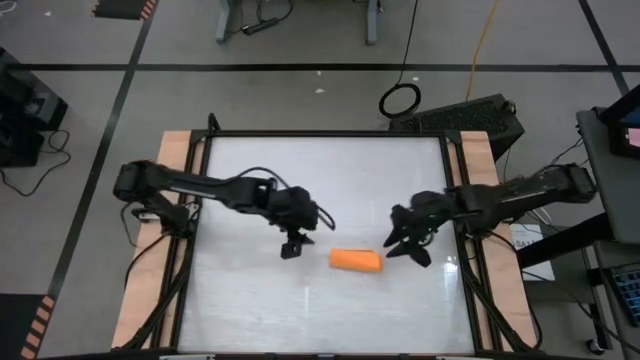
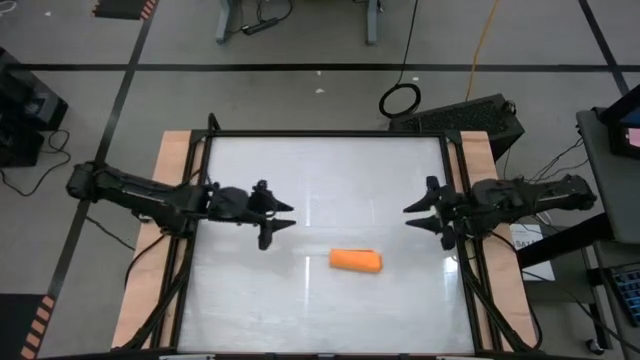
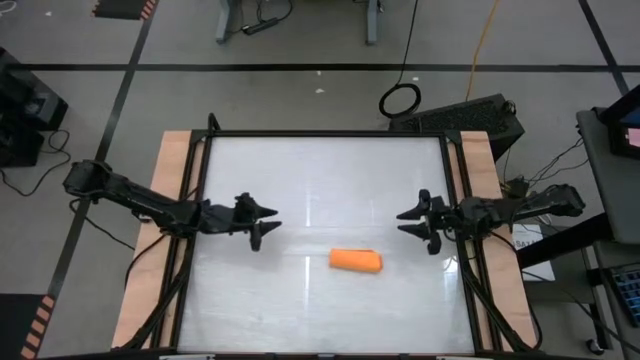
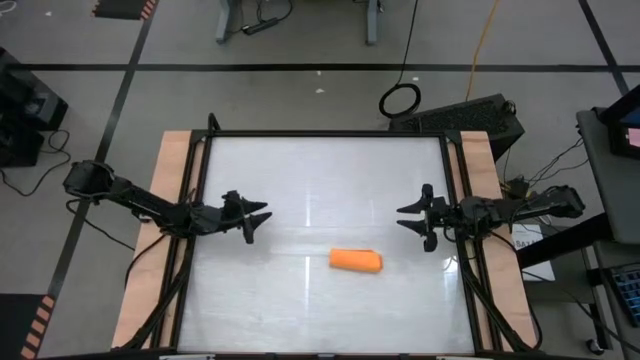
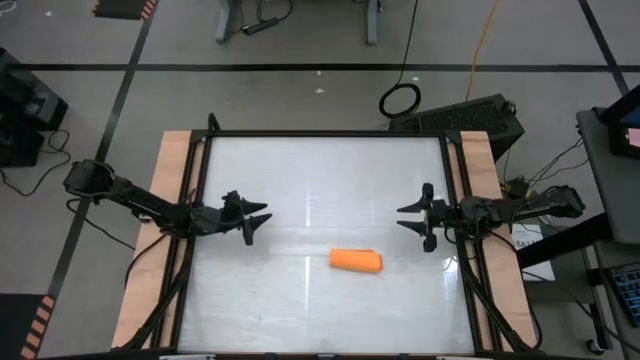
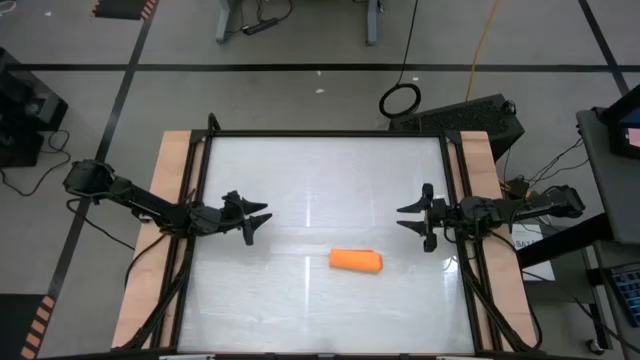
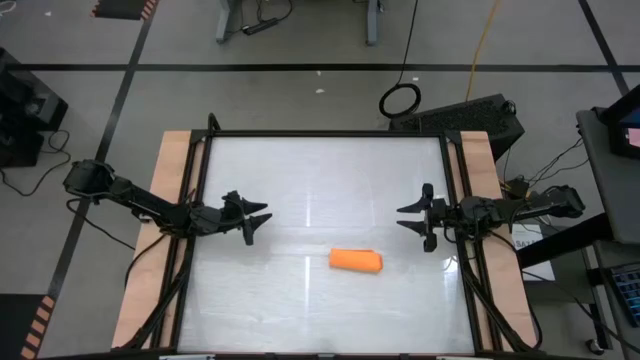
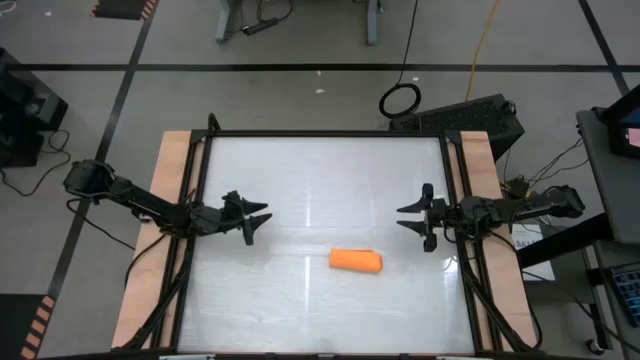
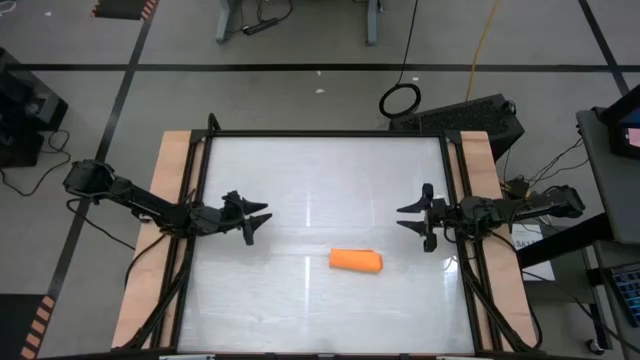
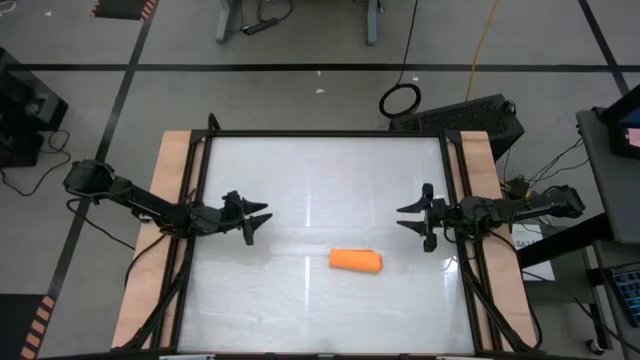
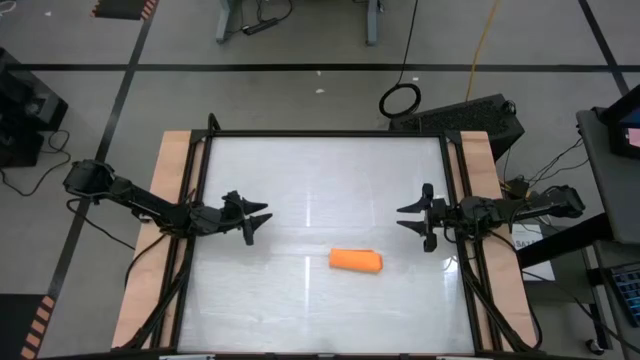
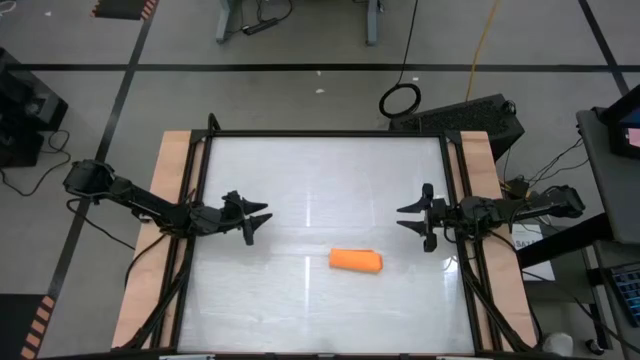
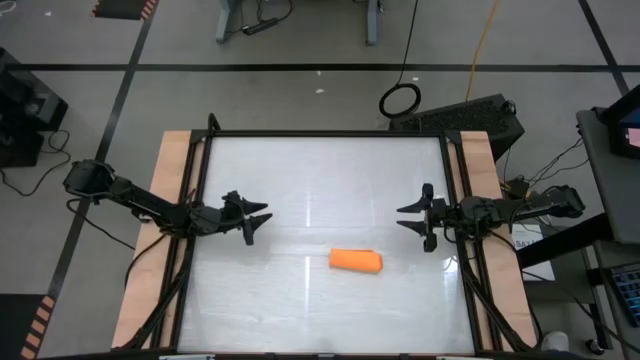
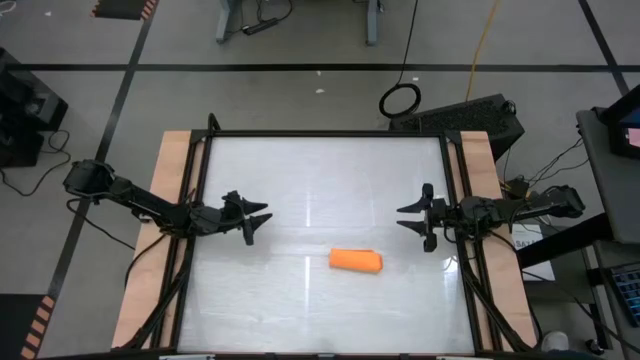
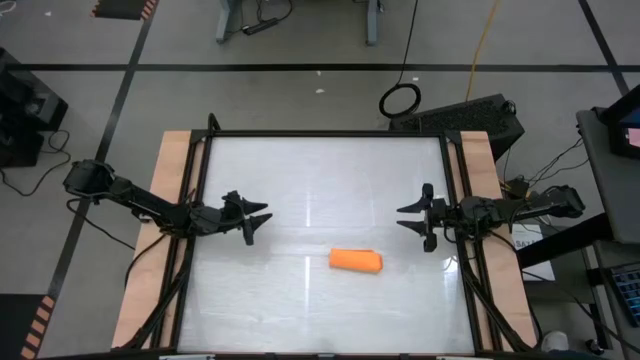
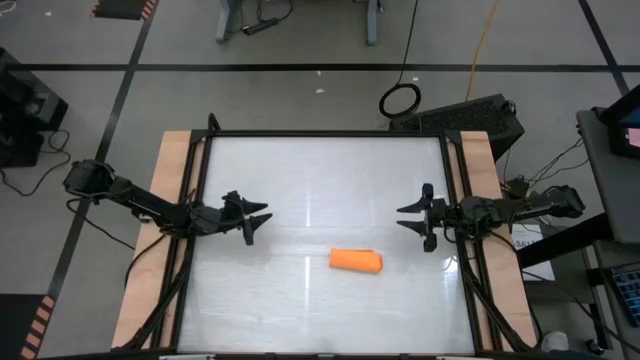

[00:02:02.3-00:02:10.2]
Task: Roll towel
Return to Home Position

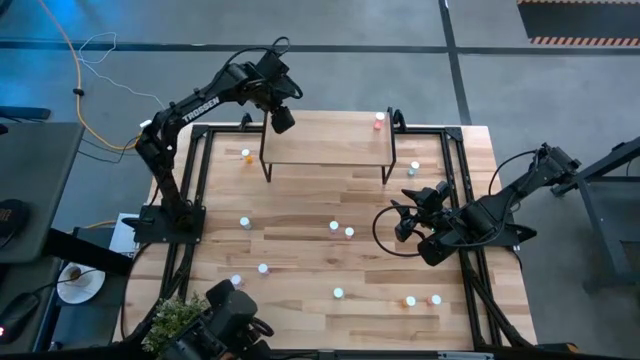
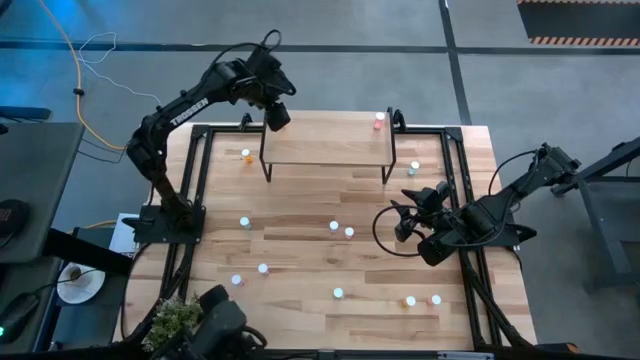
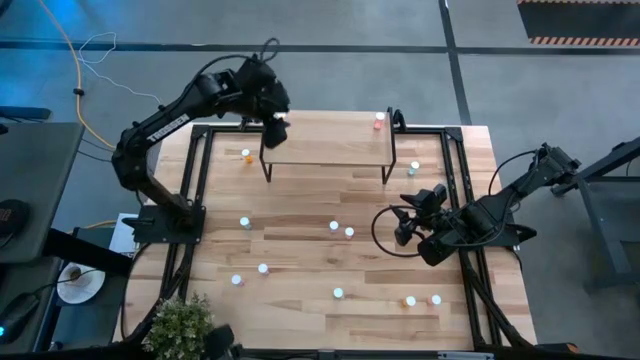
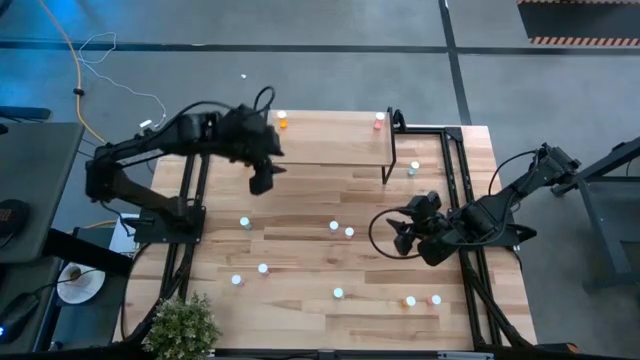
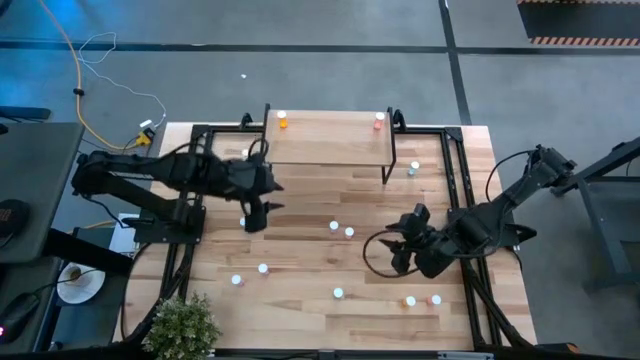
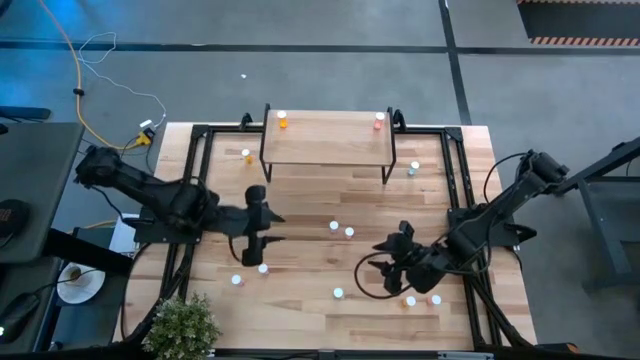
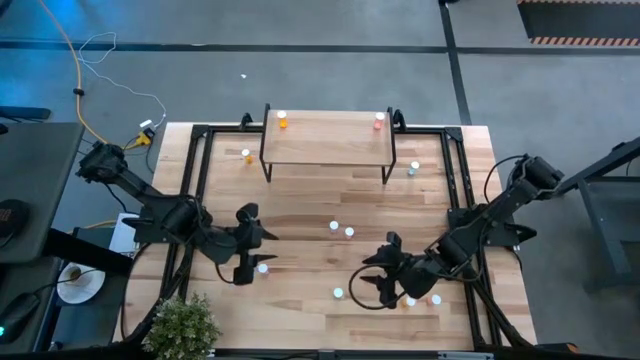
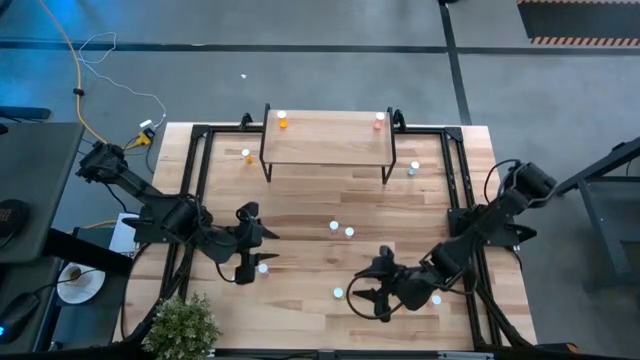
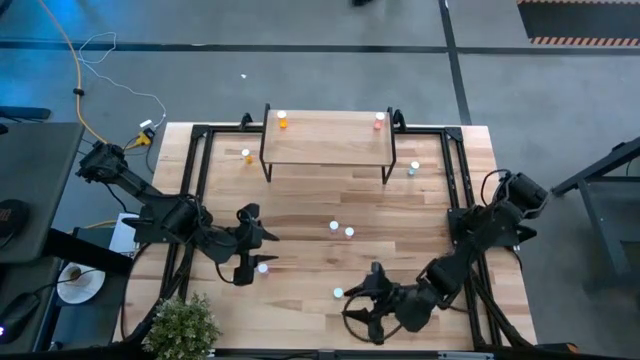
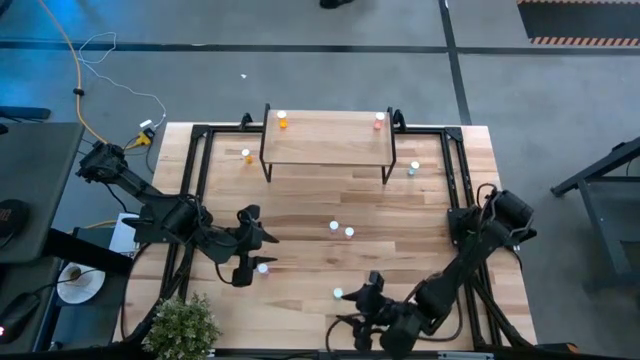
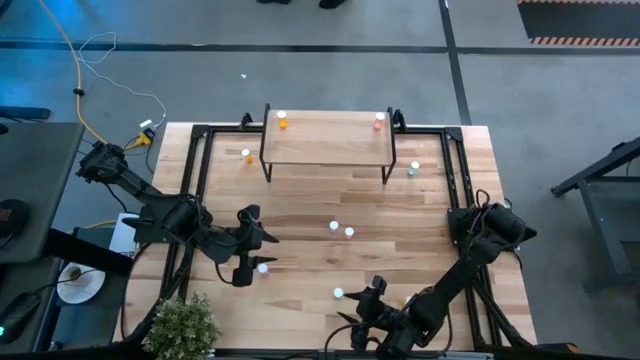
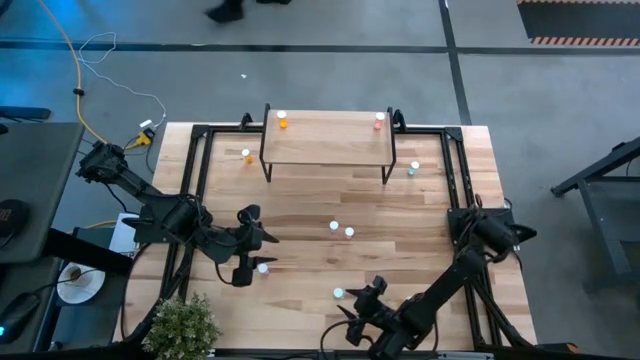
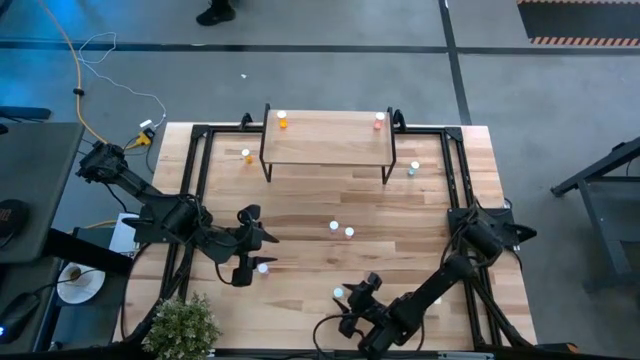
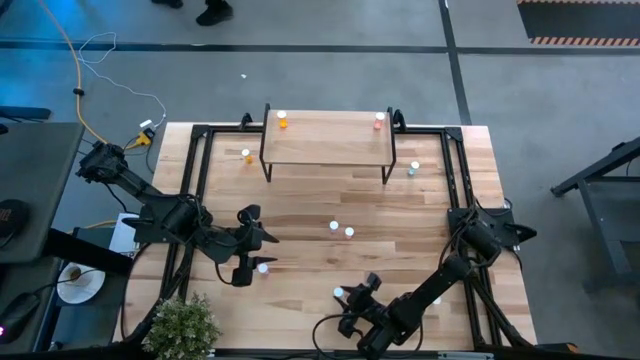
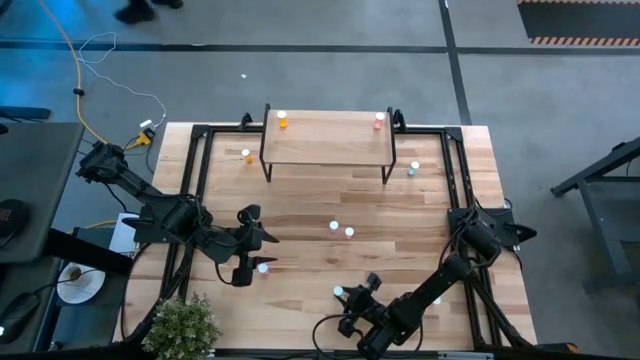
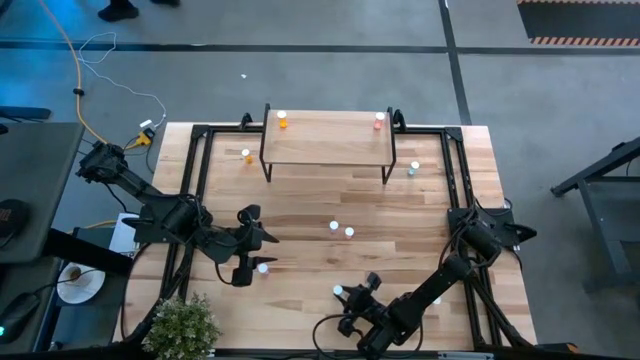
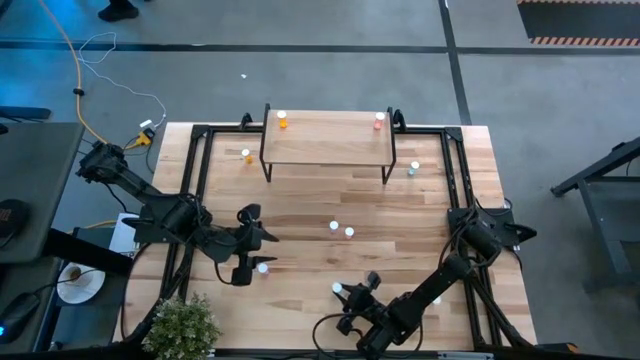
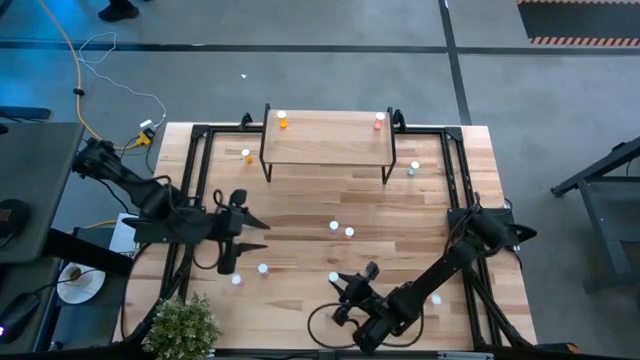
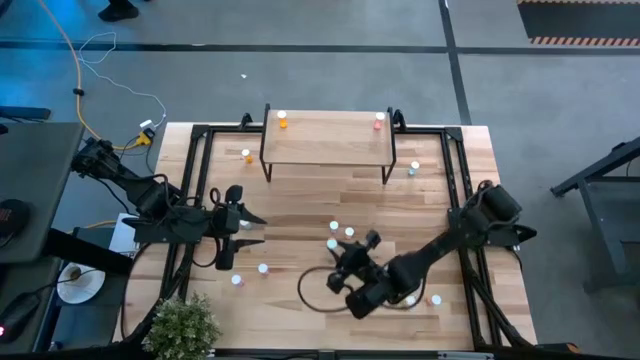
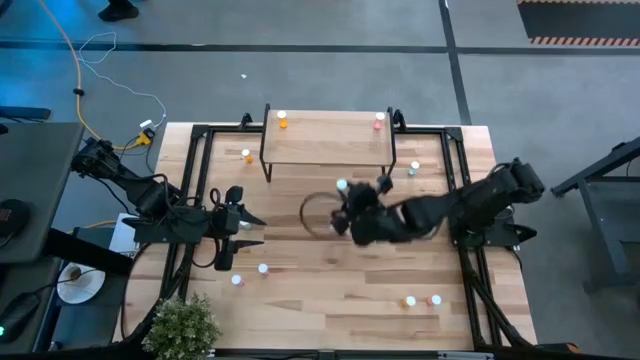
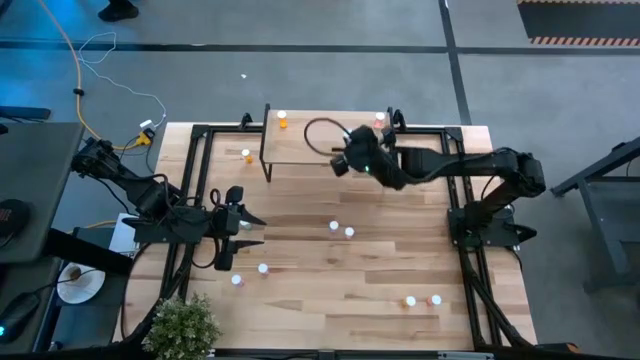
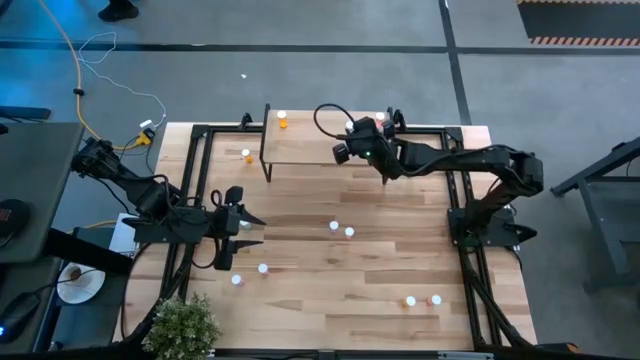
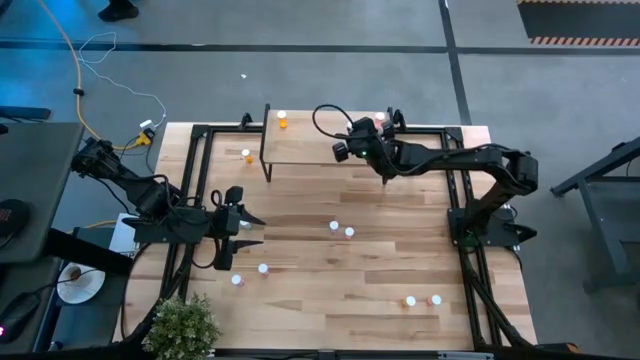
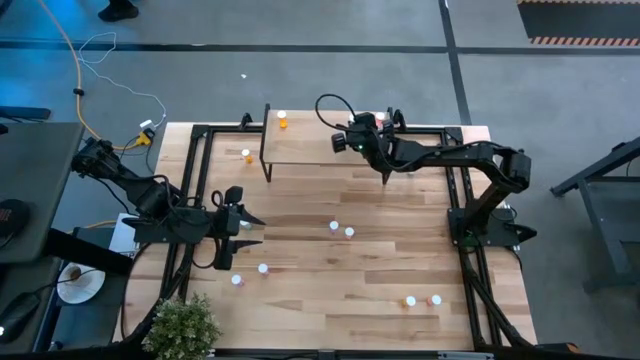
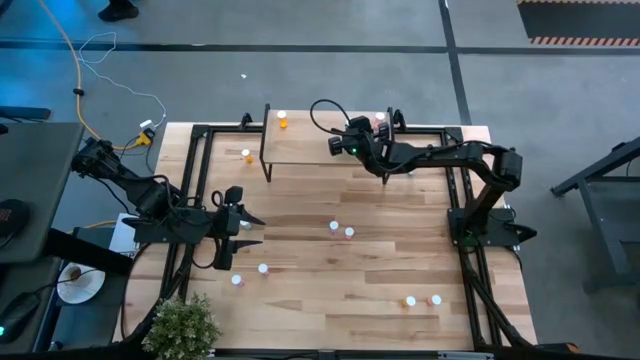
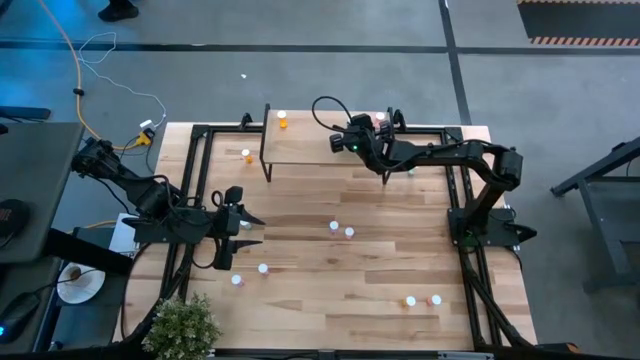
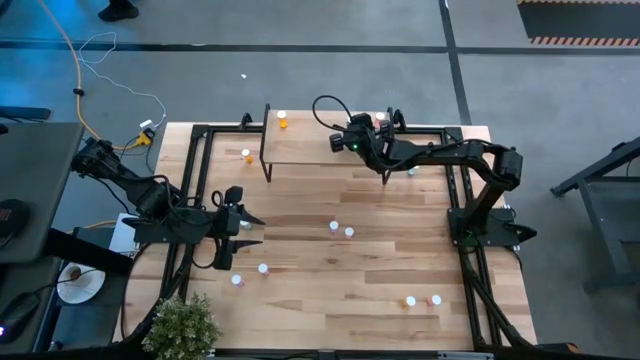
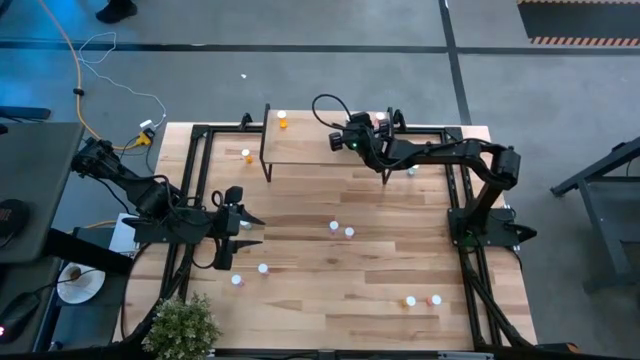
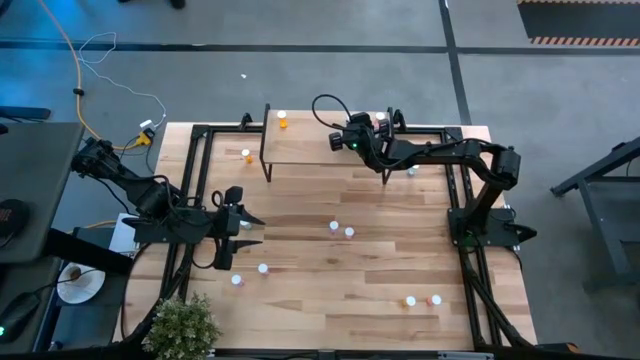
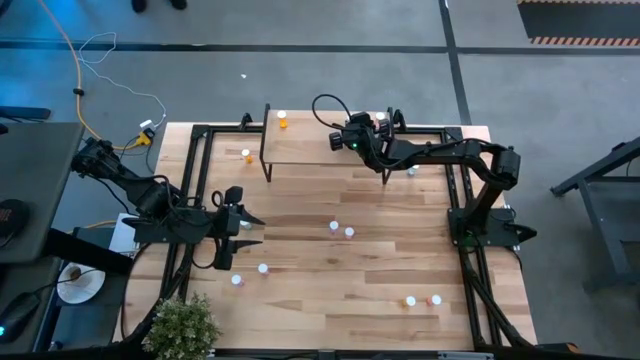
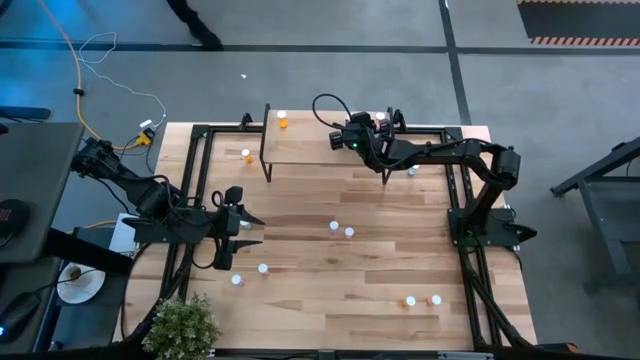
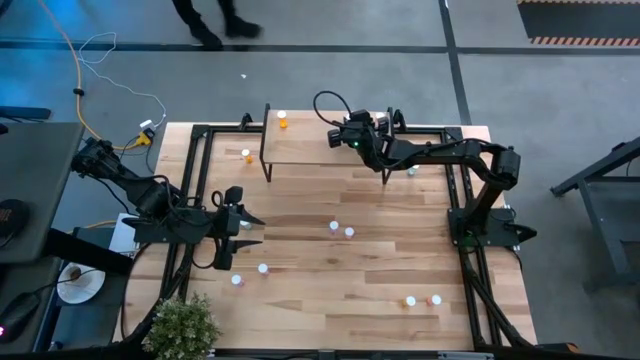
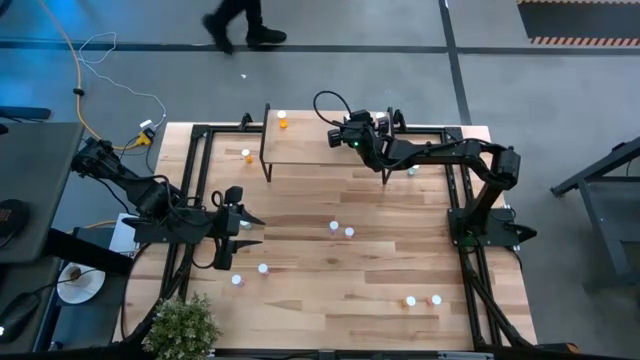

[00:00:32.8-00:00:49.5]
Task: Pick and place medicine bottles onto shelf by color
Put the bottom green pill bottle on the shelf
